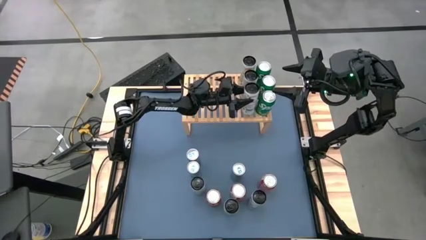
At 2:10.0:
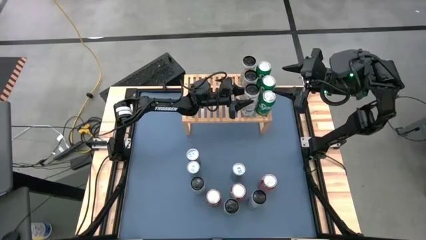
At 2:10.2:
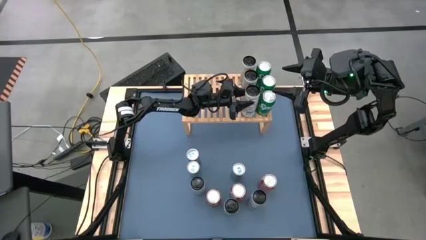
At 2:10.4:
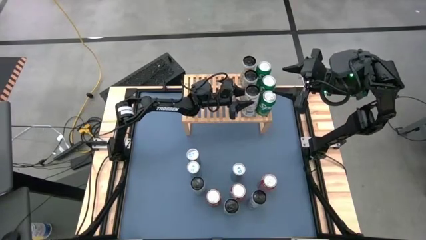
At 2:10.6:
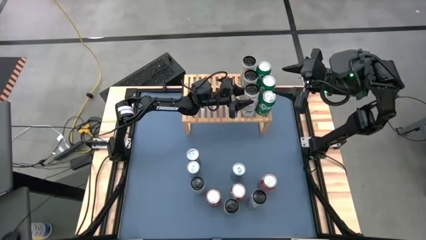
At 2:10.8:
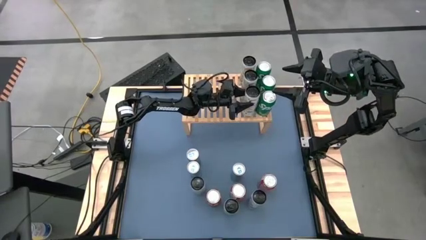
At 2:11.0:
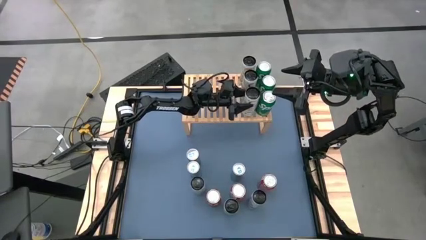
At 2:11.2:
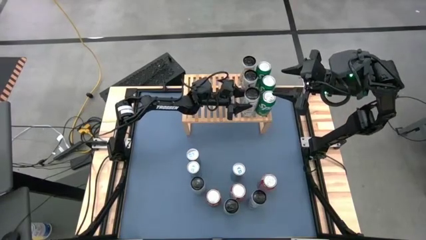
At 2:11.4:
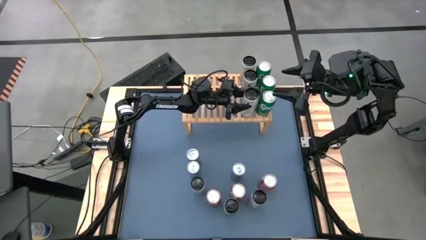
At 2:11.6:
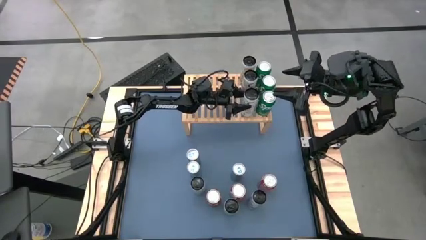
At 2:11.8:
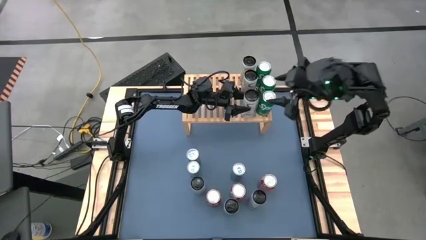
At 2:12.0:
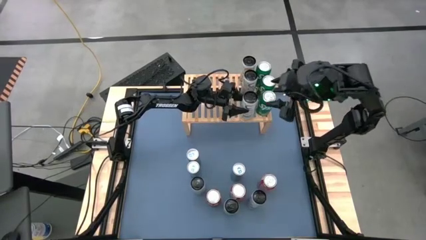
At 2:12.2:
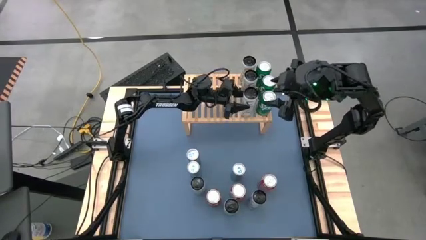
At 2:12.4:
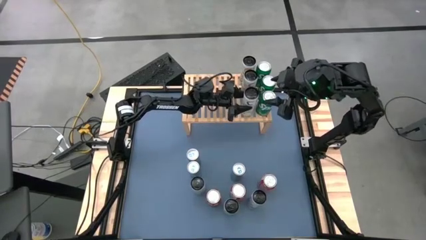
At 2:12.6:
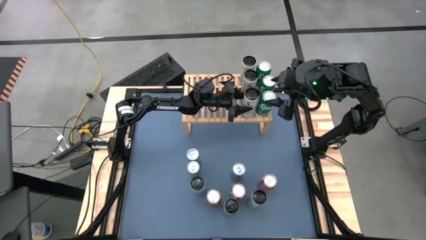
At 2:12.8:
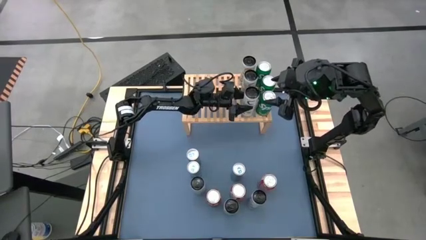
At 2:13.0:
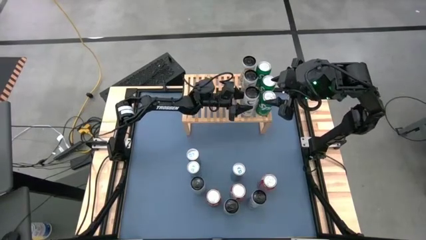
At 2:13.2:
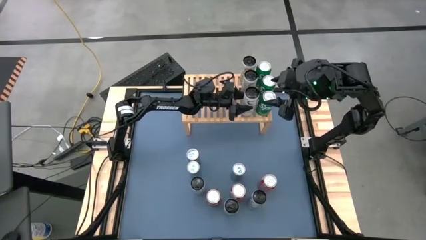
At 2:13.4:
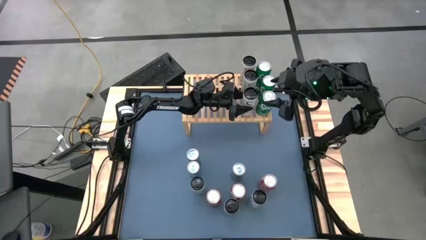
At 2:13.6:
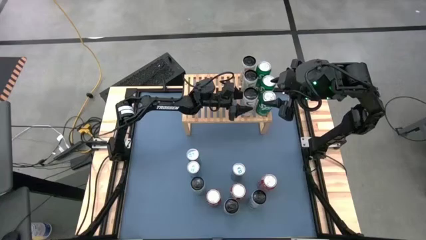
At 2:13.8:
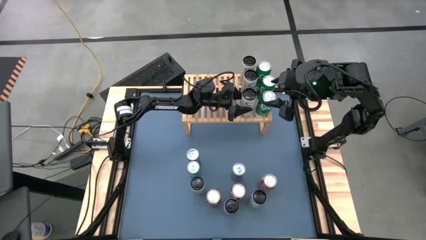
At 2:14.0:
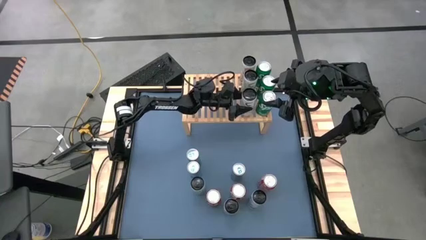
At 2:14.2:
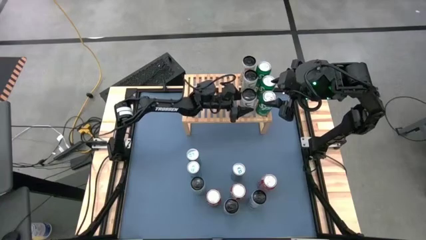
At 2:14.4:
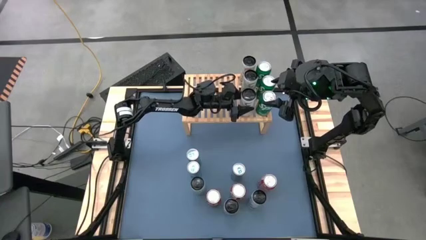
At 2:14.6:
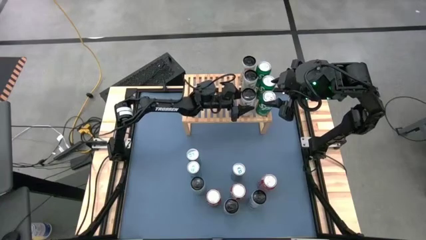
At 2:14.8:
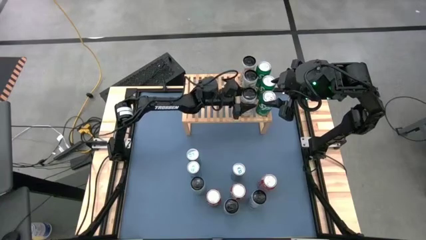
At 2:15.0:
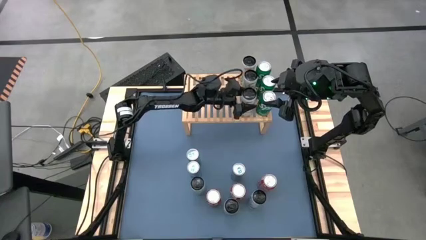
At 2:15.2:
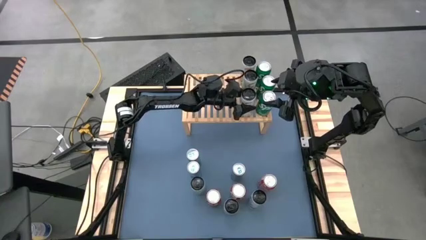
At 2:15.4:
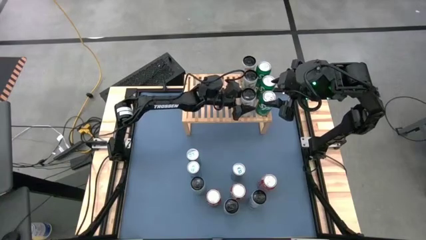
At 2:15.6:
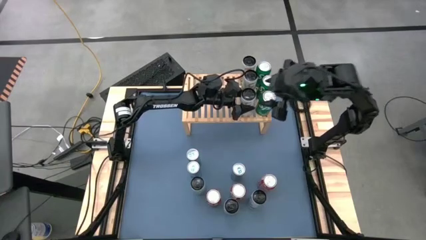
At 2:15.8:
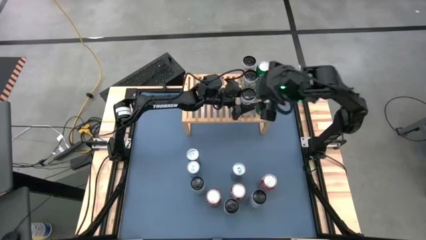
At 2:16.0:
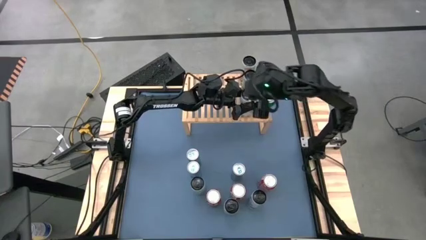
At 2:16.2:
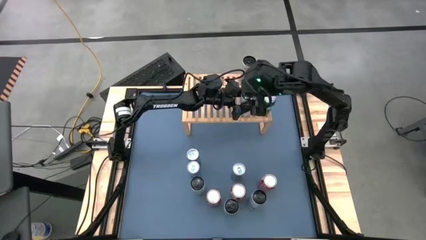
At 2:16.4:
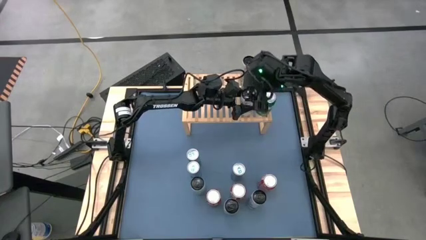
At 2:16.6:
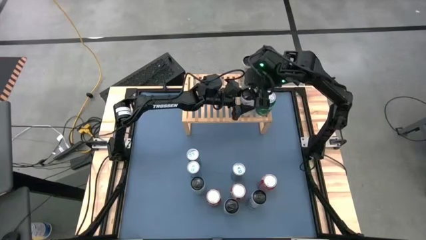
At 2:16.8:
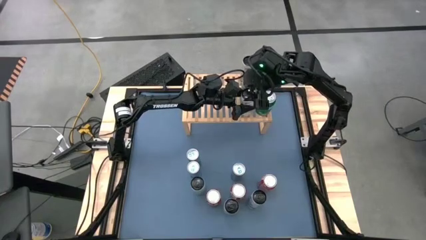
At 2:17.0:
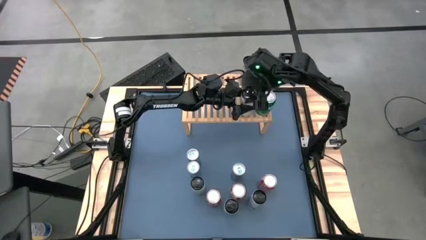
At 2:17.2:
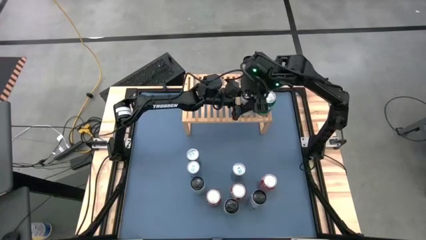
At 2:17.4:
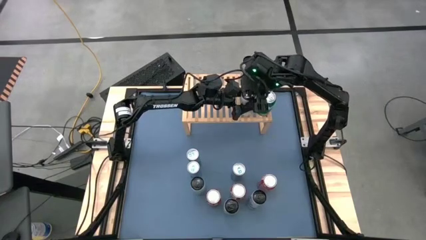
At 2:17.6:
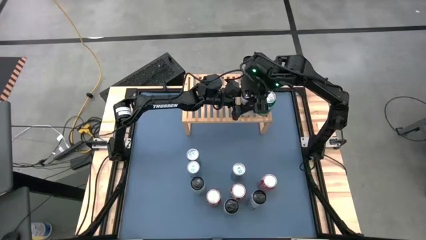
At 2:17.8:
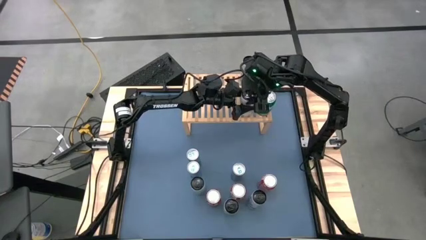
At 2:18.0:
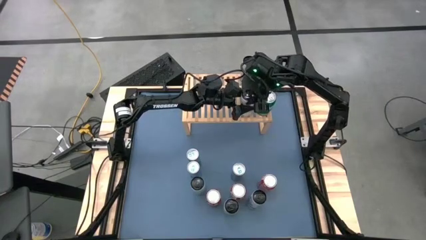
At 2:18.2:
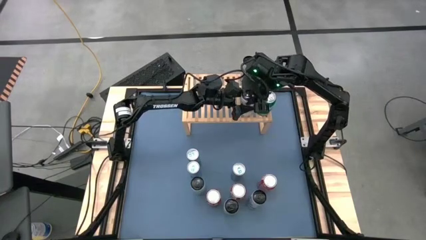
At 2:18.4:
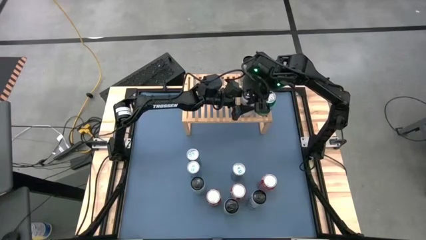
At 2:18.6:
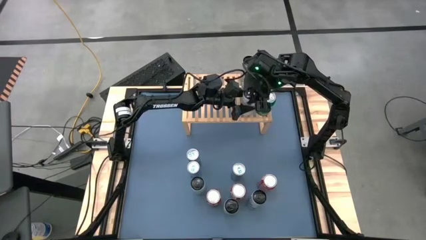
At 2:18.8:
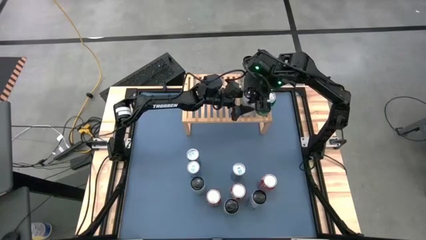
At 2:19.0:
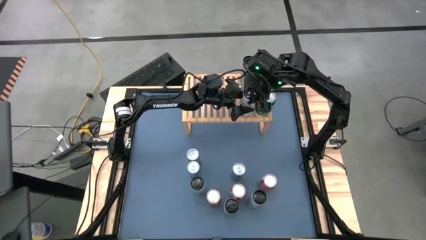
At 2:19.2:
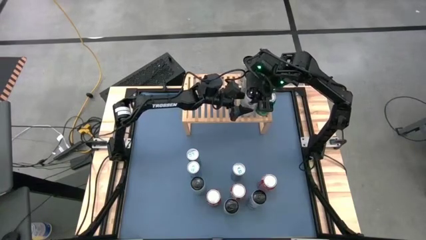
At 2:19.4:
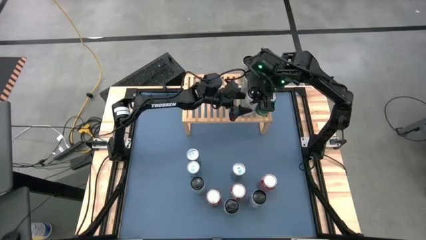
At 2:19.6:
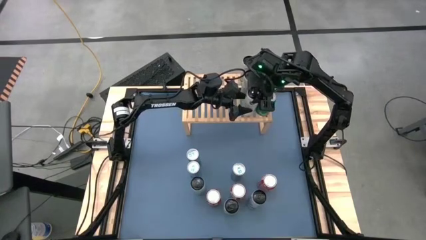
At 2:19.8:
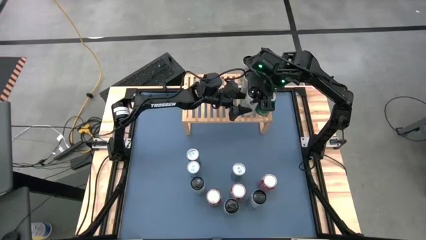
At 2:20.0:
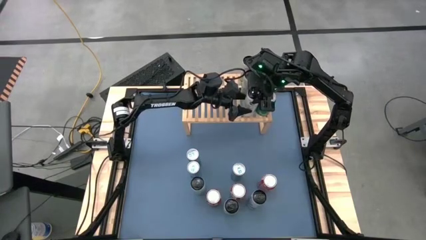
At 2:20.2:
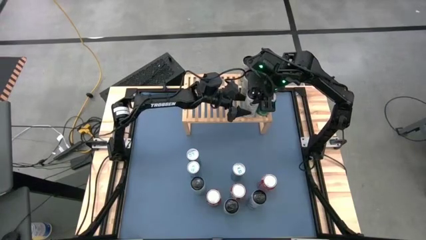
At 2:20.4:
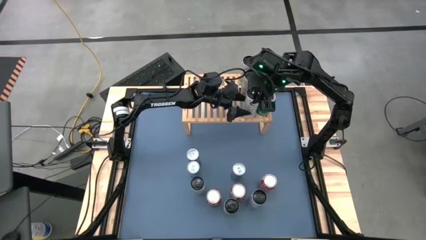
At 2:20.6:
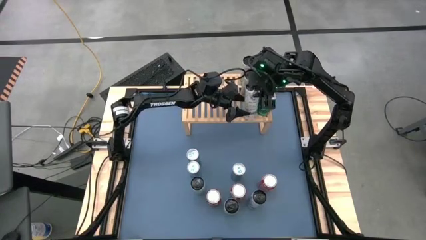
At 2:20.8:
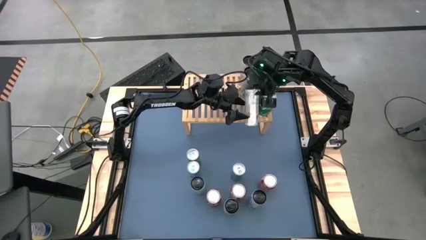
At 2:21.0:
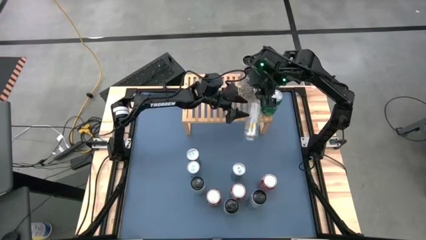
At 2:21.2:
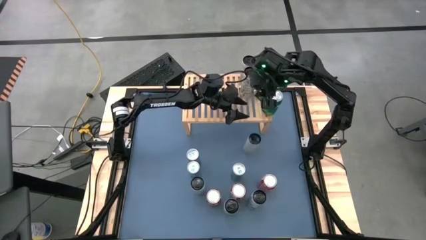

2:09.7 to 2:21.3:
Task: Place canned beverage on shelf
Put the white-yellow soda can on the shelf aligned with the other white-yellow soda can

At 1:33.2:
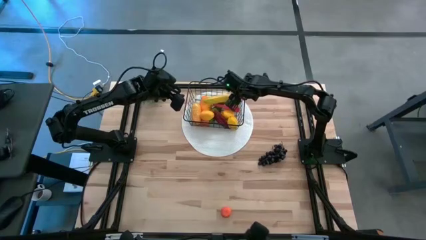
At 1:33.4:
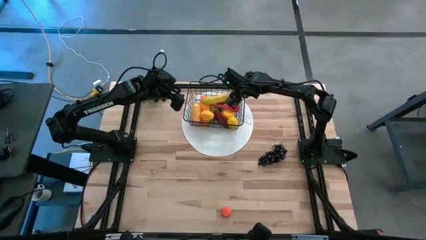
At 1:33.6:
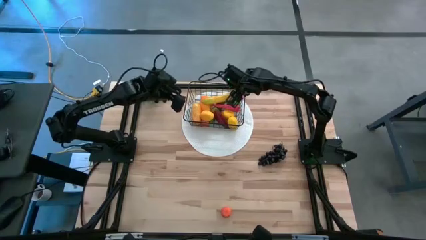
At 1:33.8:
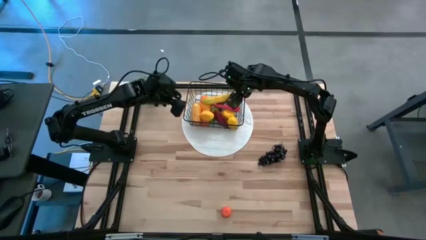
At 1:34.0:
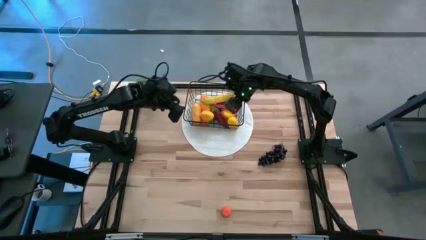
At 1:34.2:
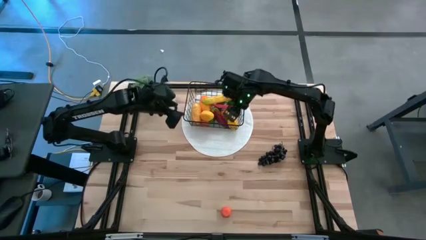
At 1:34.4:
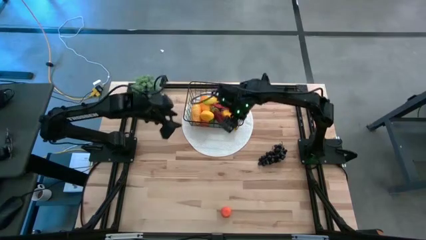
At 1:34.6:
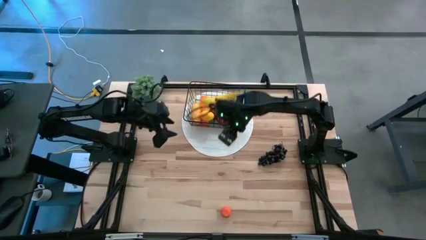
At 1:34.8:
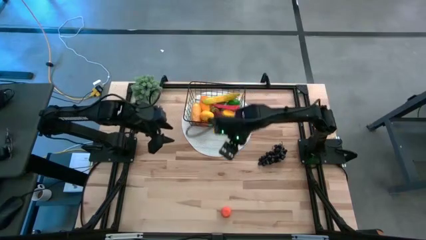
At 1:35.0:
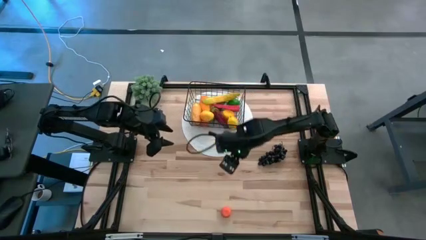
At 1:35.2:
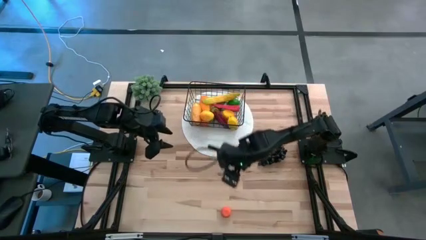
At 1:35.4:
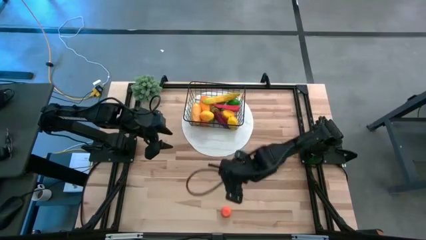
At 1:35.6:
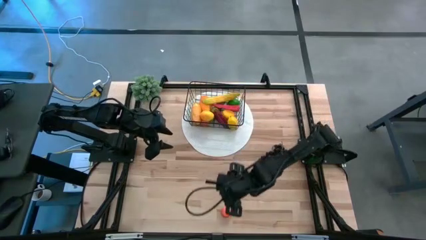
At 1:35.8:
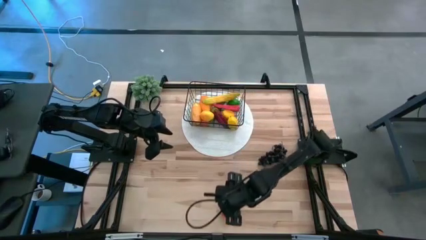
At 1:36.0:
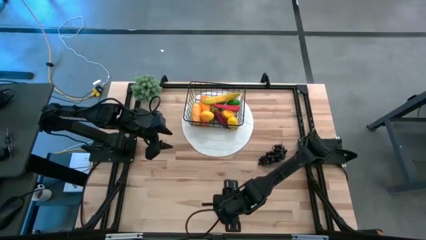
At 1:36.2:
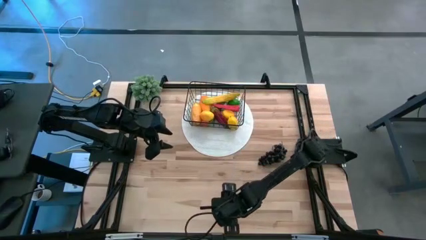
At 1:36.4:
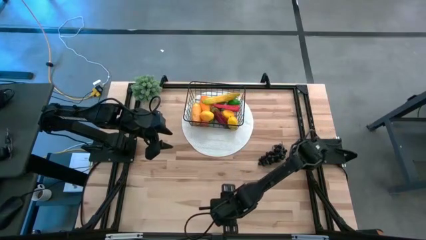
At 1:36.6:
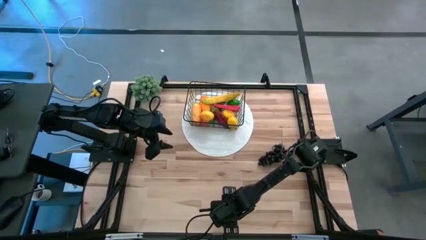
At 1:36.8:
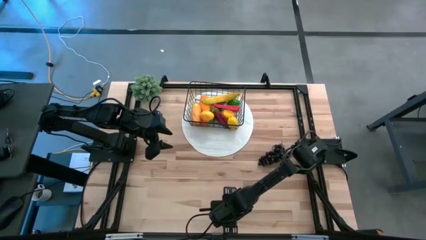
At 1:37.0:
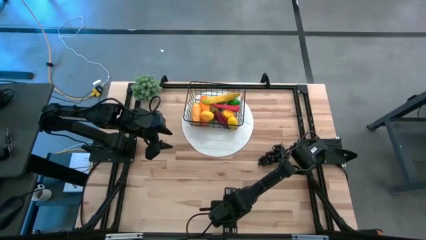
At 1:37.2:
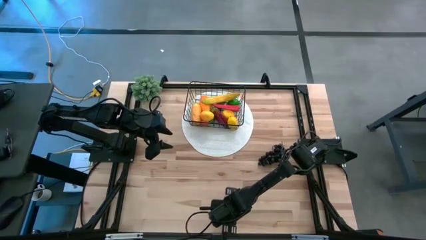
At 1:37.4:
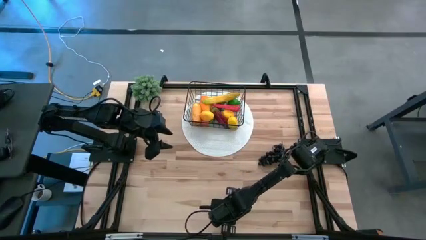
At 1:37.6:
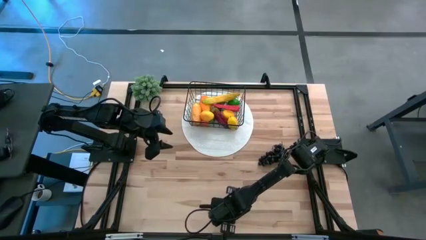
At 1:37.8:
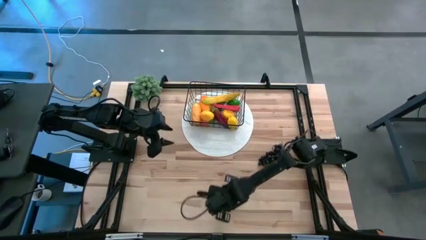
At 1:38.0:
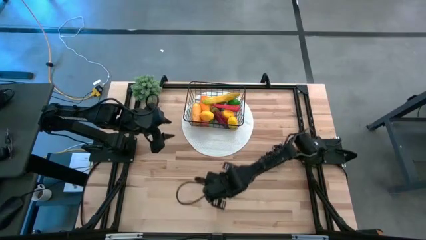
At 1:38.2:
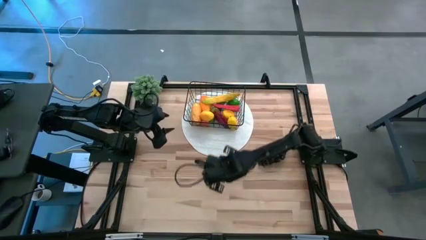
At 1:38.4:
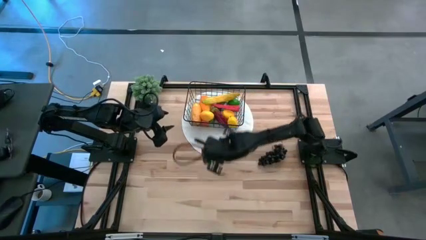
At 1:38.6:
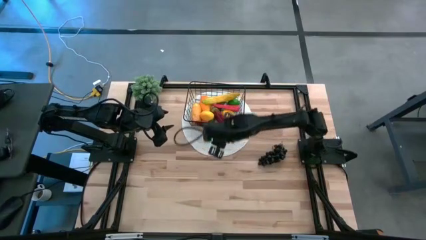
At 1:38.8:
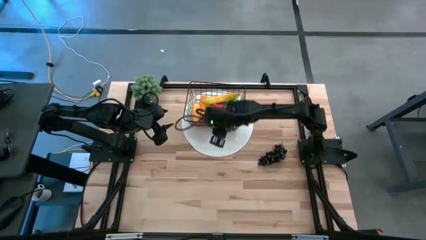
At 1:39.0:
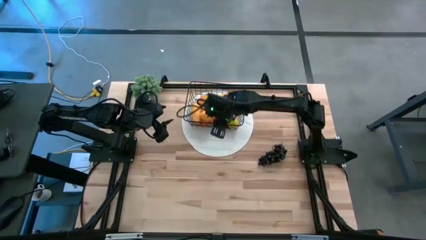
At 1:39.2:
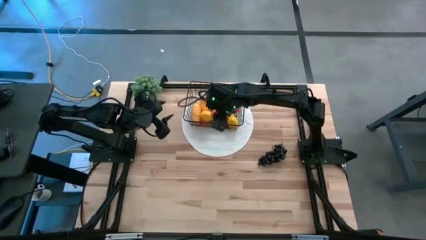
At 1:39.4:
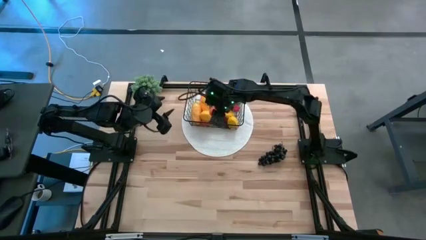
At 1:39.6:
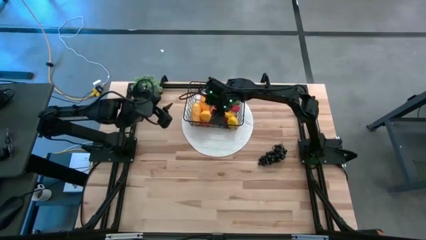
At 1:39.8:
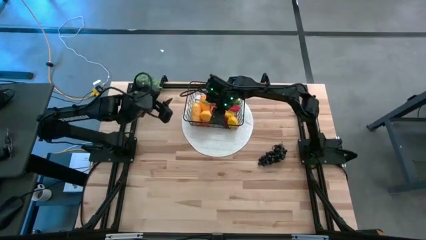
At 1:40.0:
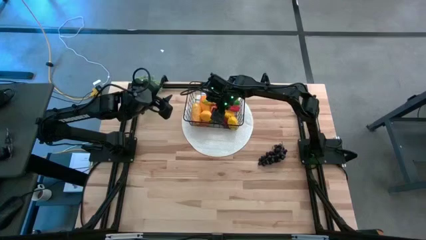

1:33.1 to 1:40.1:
Task: Build produce basket
Put the orange into the wire basket
